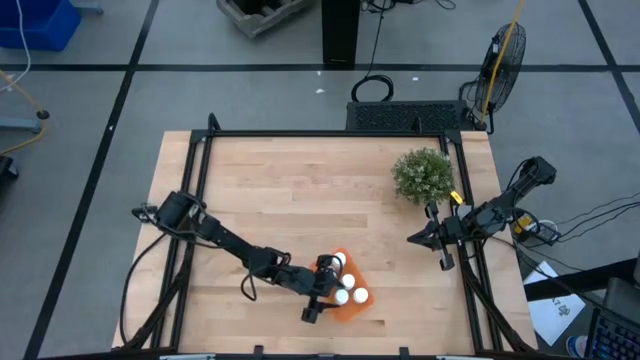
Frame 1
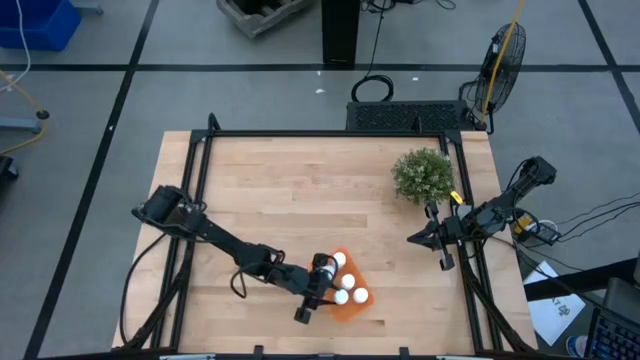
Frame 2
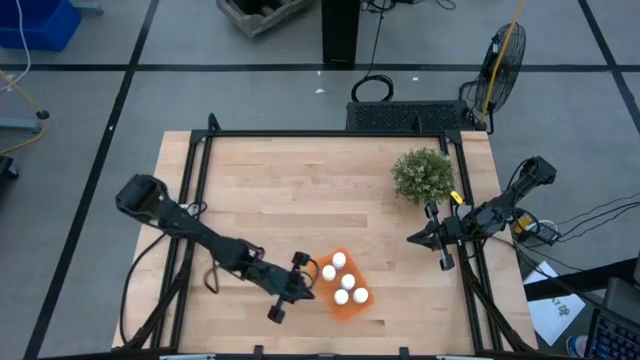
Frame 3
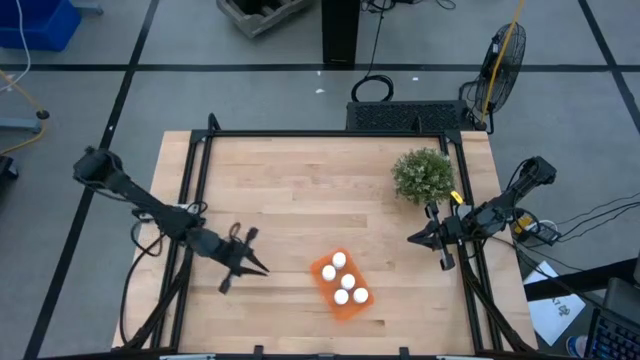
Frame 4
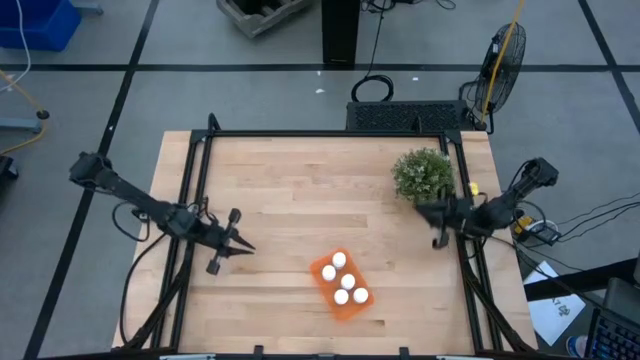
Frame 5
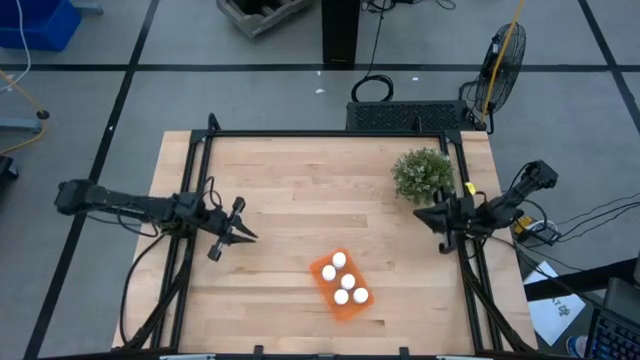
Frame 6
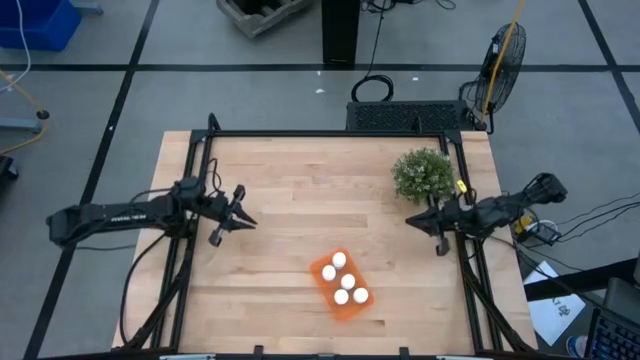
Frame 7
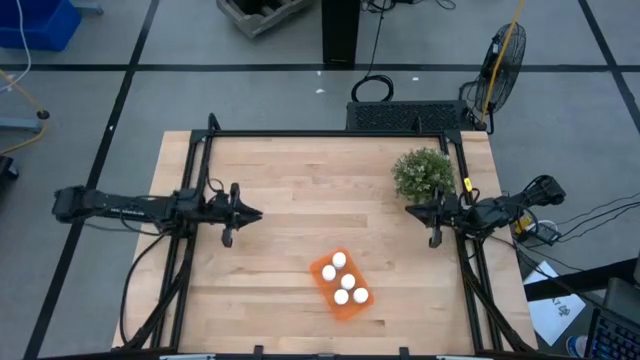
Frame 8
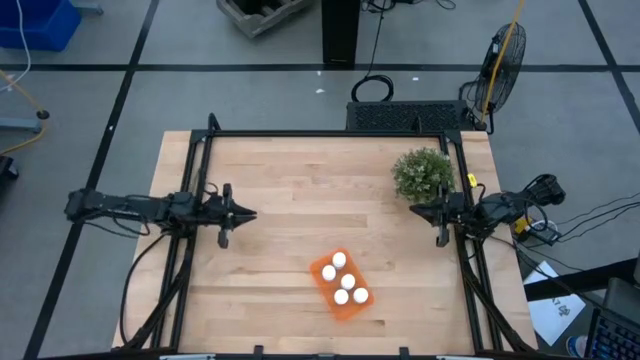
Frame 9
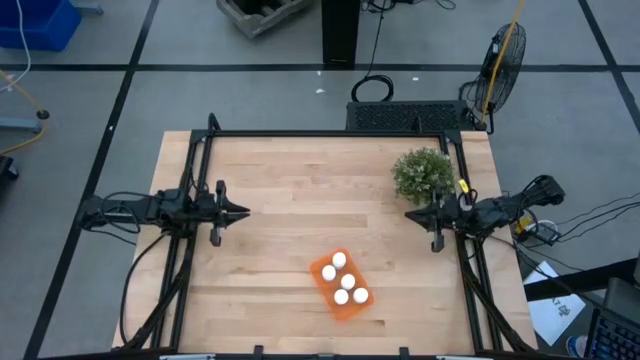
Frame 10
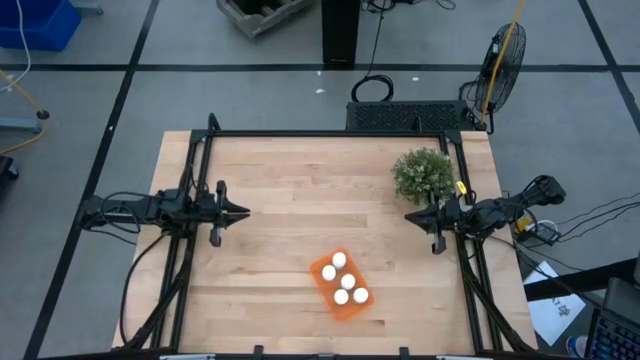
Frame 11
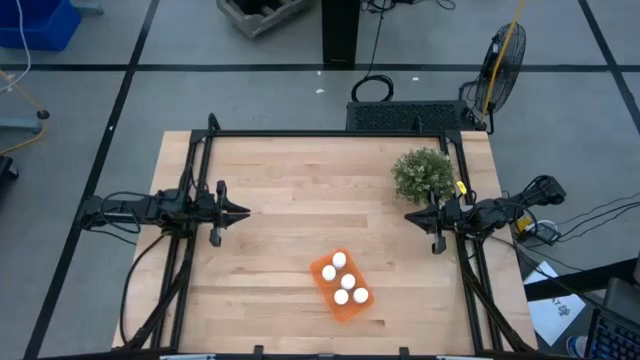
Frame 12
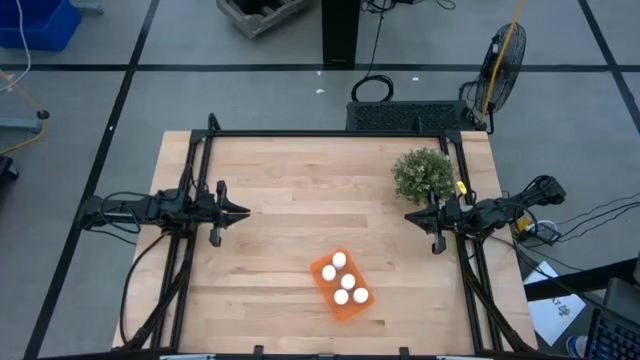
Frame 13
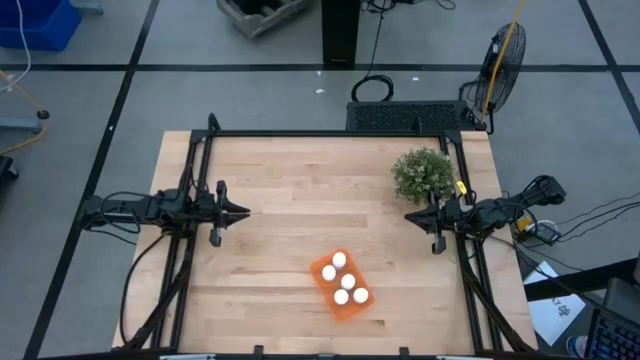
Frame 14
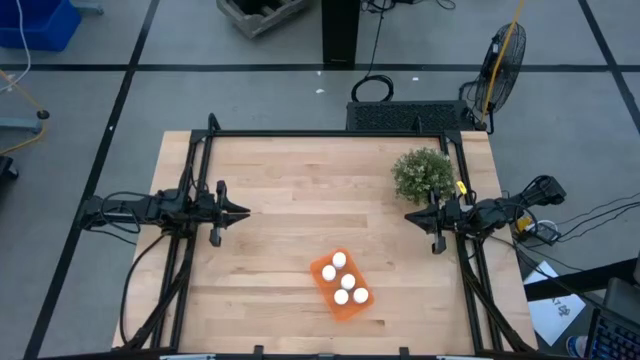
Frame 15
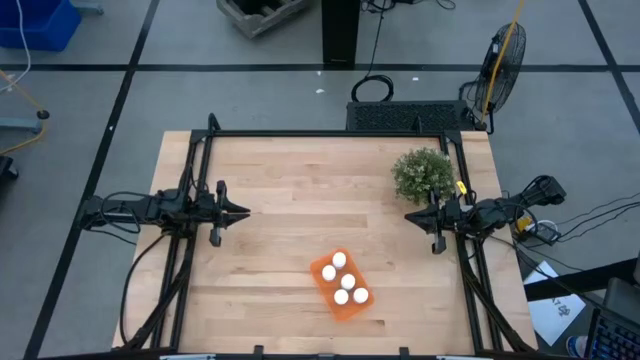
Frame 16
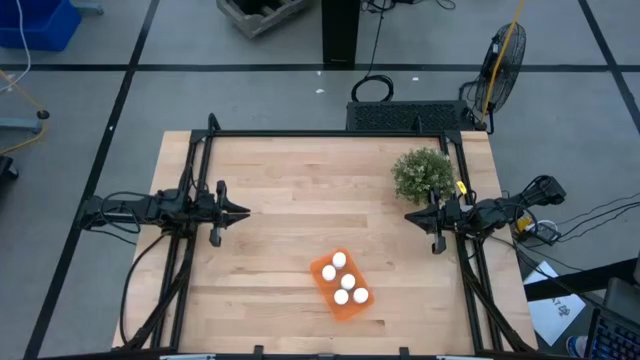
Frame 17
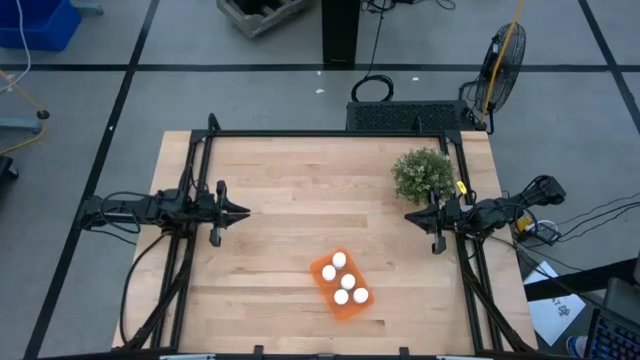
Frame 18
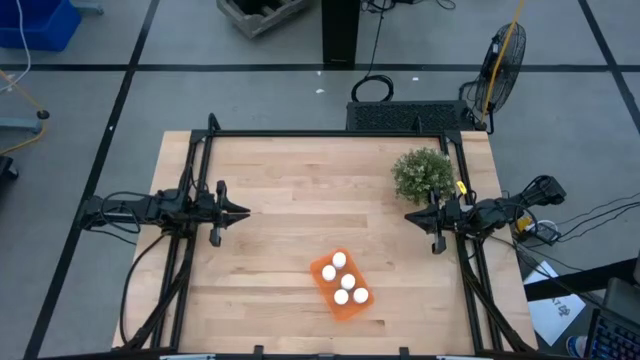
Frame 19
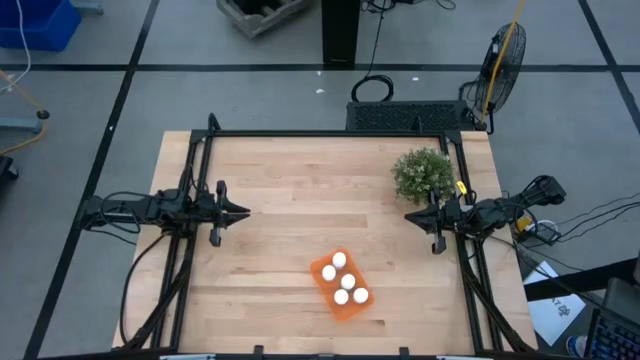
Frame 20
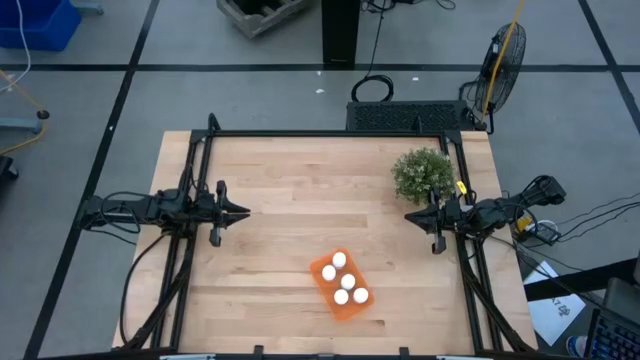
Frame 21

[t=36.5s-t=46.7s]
Task: Pick and place pill bottles into a basket
Return to Home Position

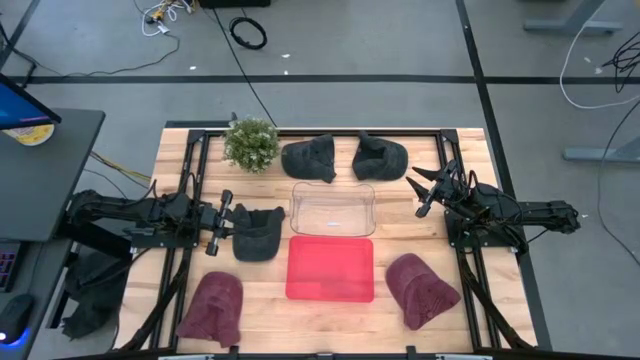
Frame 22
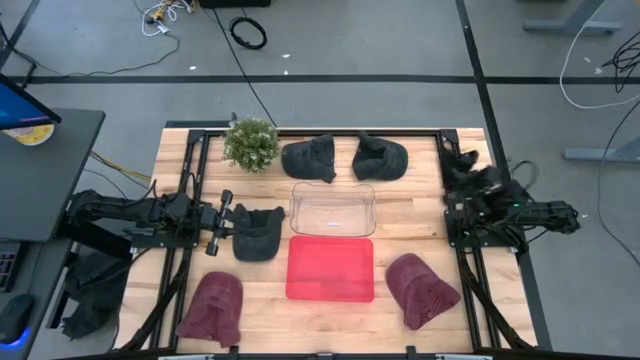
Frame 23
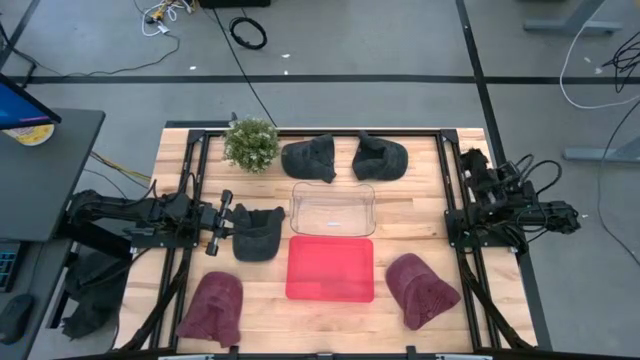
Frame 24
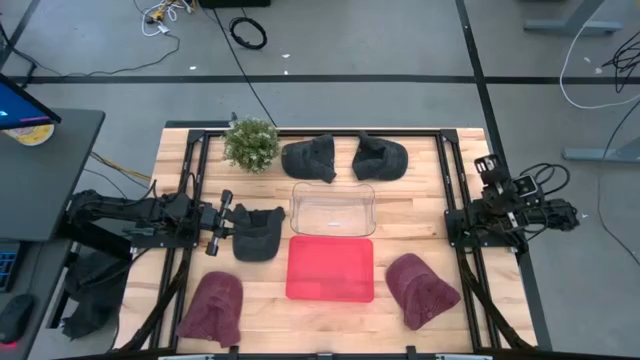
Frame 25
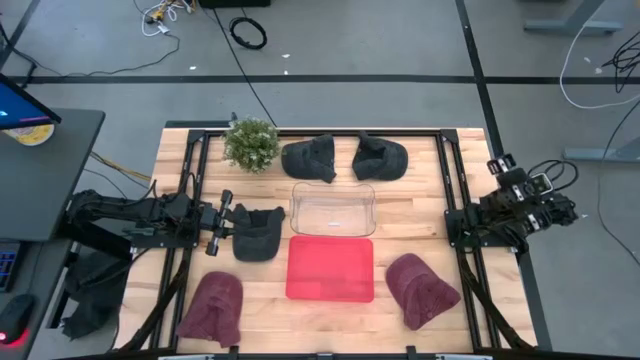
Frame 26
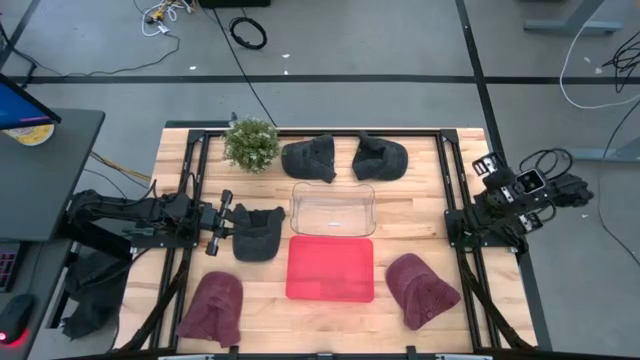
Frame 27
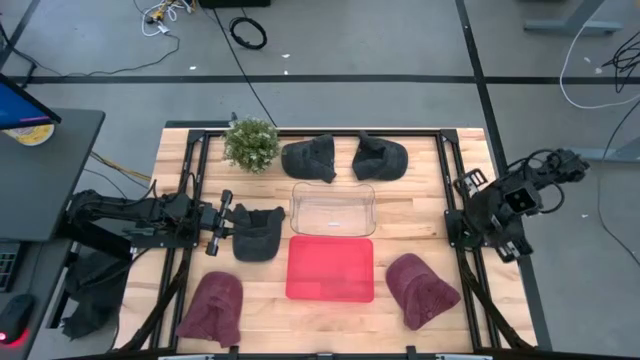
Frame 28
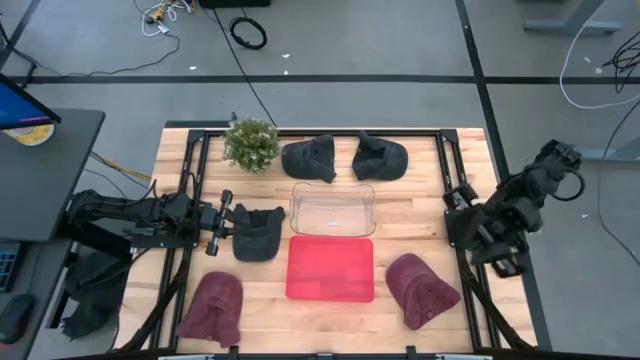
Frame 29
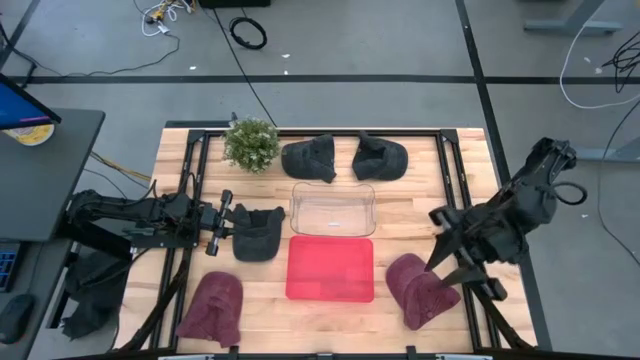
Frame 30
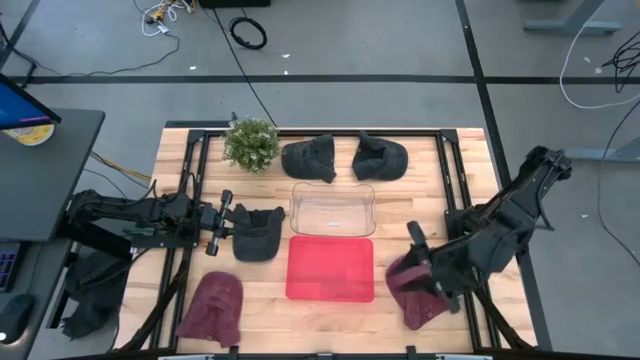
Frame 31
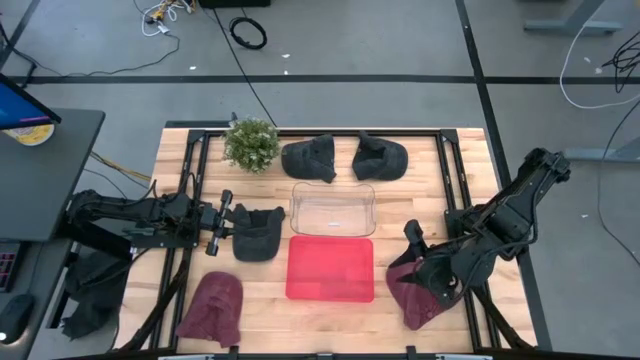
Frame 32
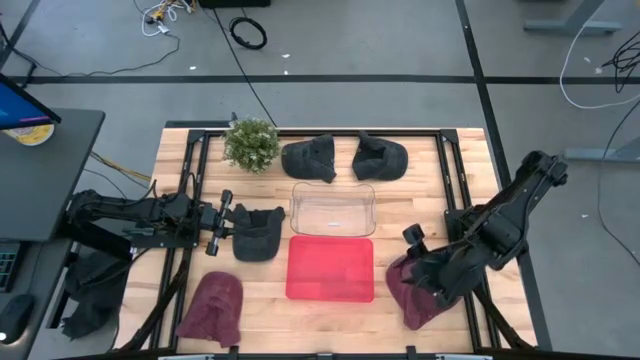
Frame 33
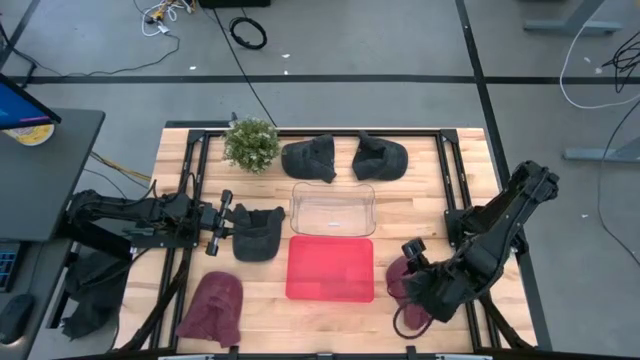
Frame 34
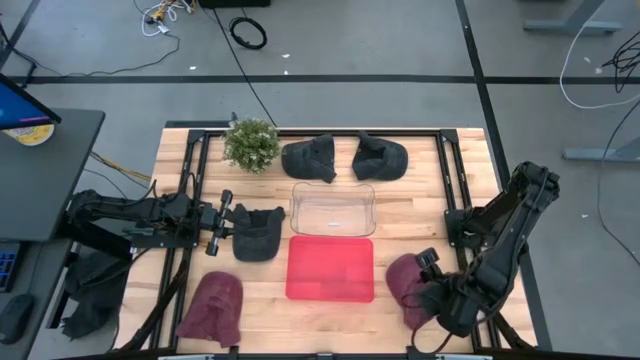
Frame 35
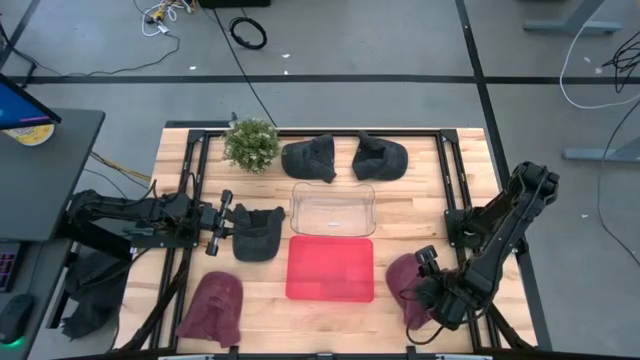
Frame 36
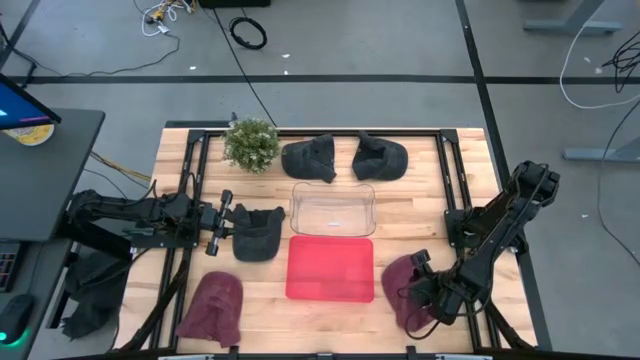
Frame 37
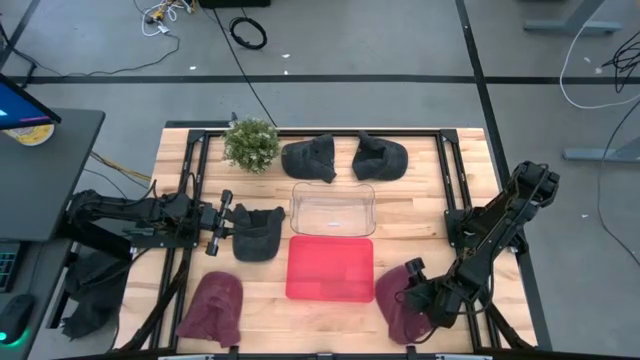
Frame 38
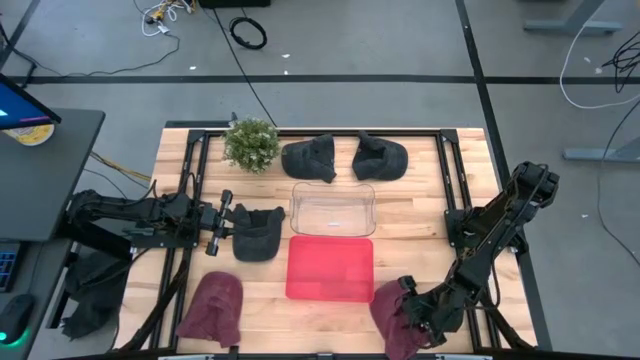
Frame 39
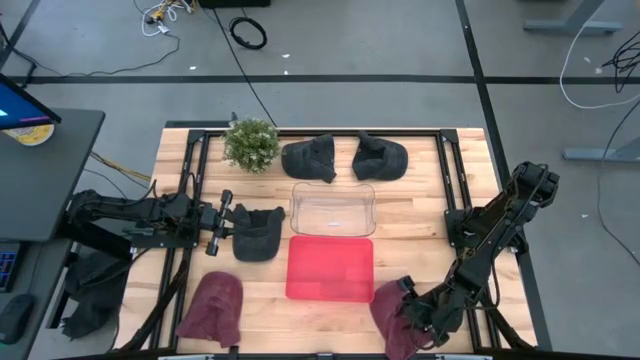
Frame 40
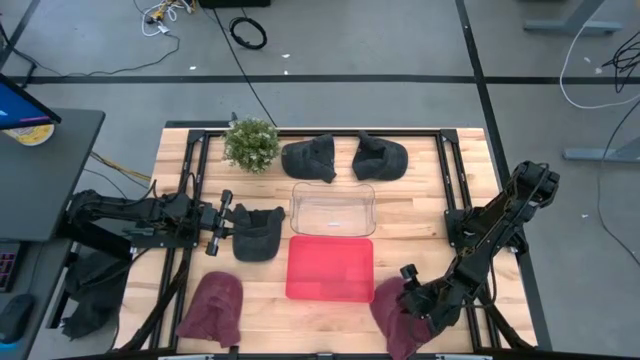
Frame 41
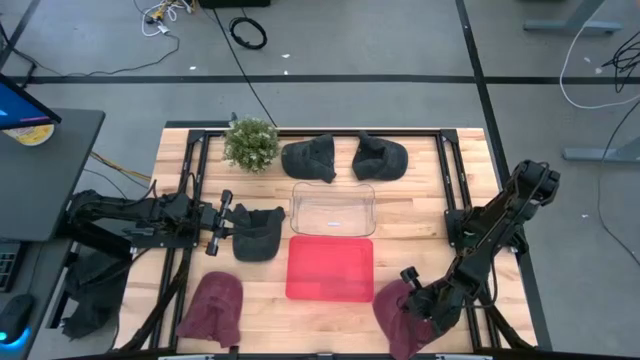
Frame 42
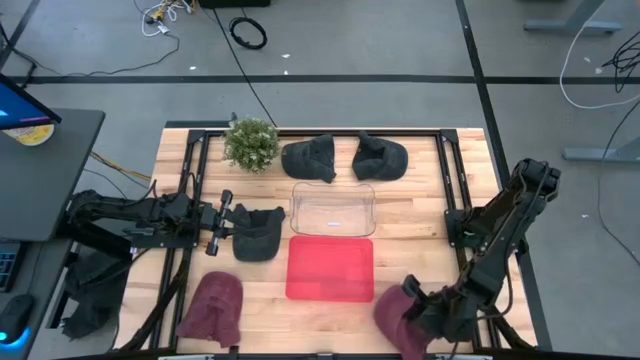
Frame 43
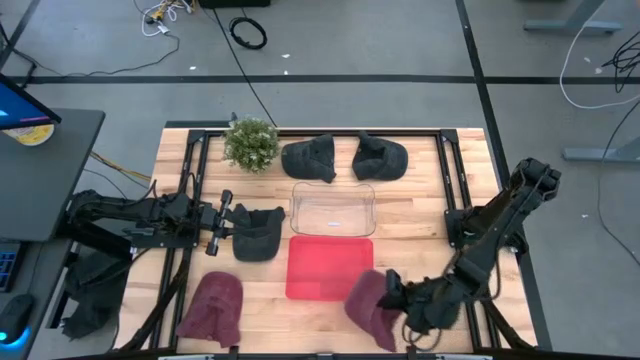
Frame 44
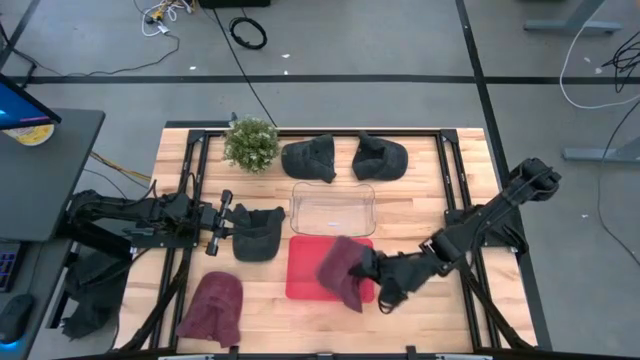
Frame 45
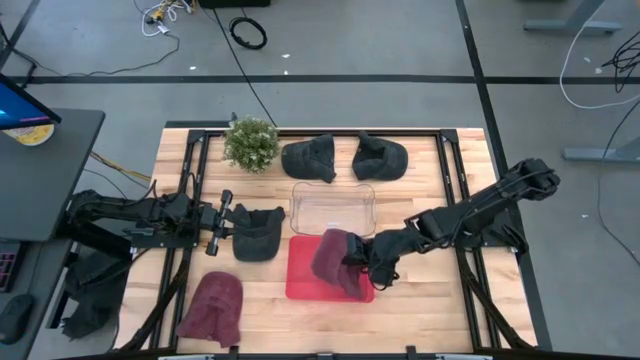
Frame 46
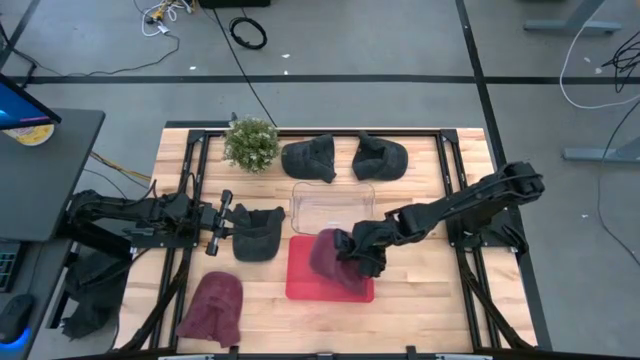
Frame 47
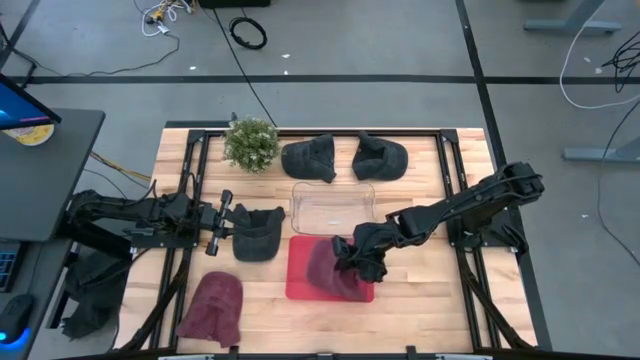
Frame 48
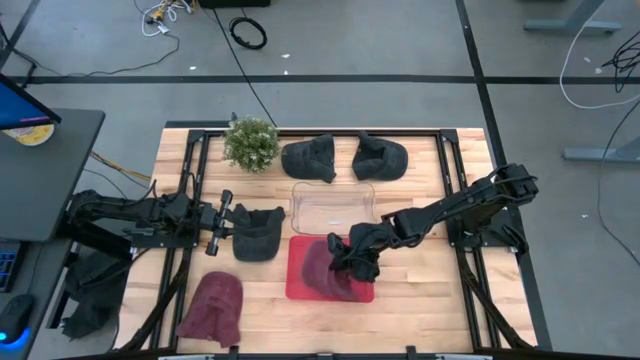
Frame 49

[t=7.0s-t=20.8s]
Task: Pick & Place hat
Put the right red cap into the pink bin
